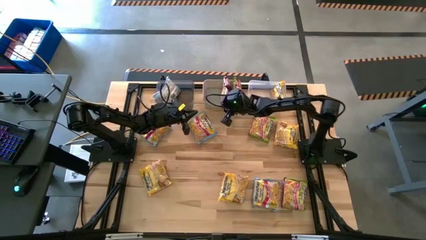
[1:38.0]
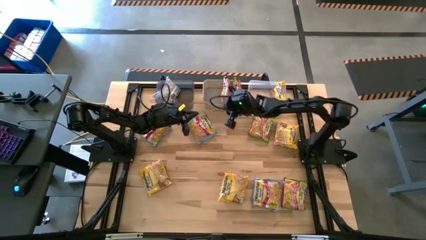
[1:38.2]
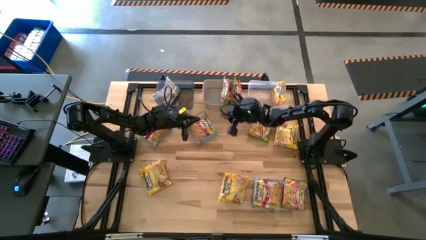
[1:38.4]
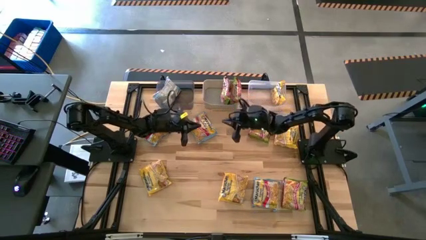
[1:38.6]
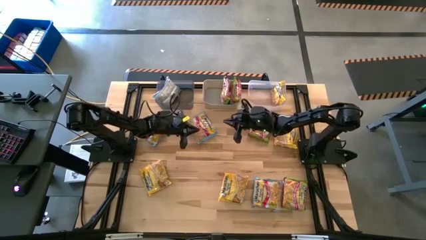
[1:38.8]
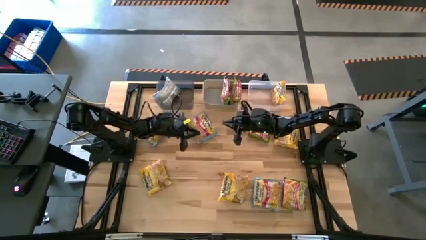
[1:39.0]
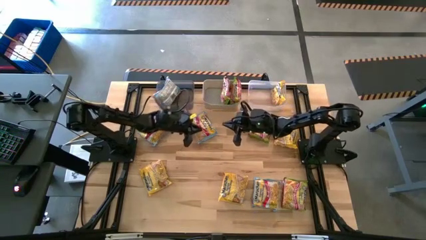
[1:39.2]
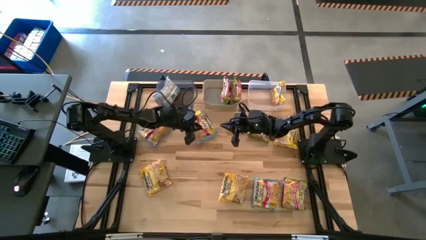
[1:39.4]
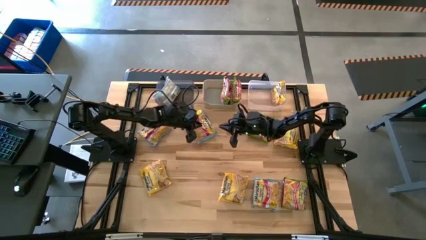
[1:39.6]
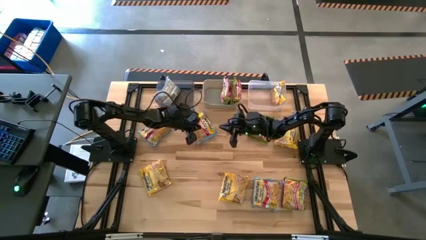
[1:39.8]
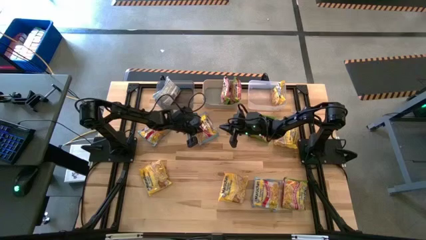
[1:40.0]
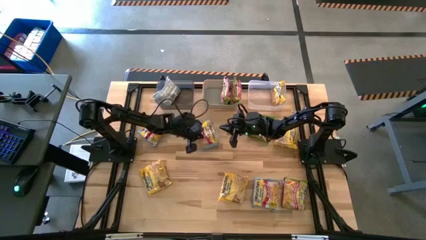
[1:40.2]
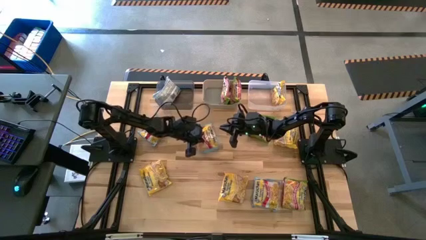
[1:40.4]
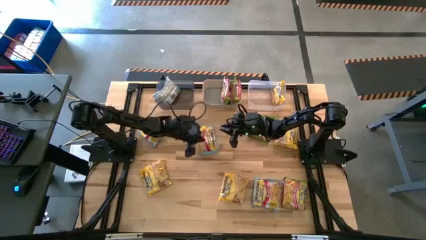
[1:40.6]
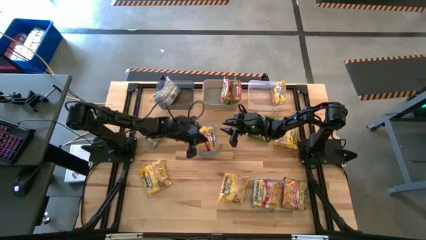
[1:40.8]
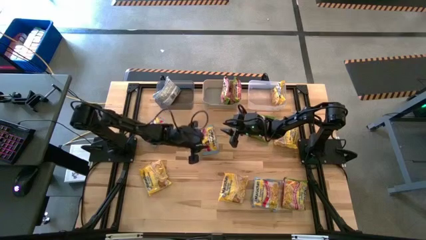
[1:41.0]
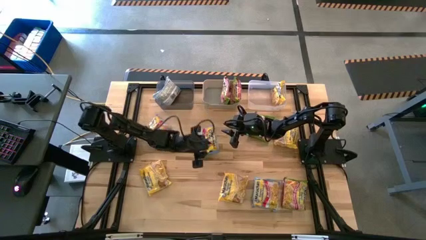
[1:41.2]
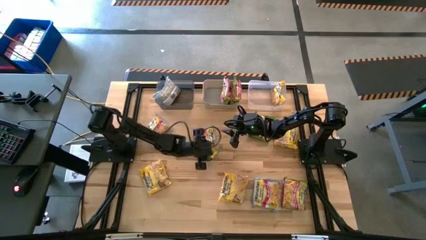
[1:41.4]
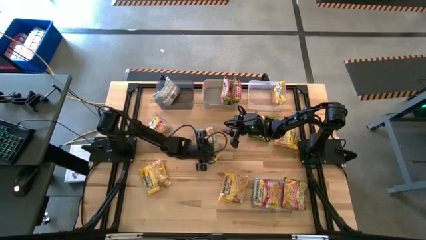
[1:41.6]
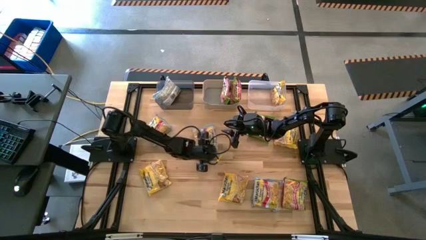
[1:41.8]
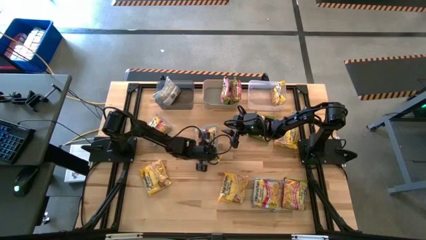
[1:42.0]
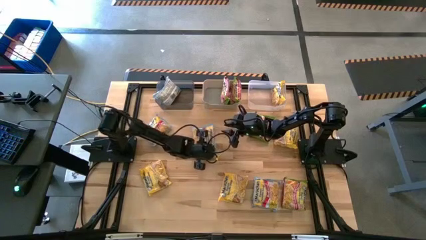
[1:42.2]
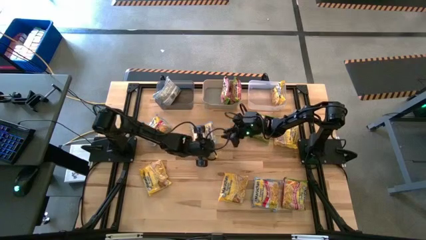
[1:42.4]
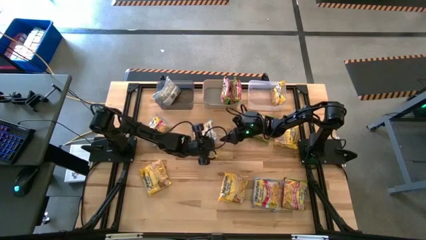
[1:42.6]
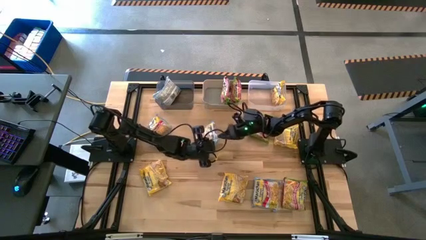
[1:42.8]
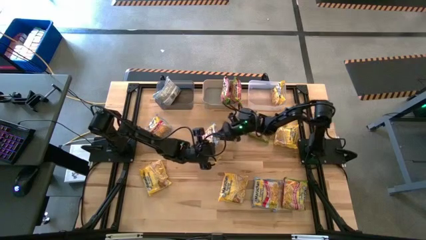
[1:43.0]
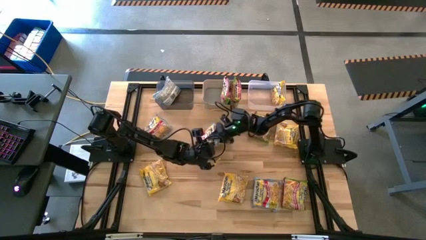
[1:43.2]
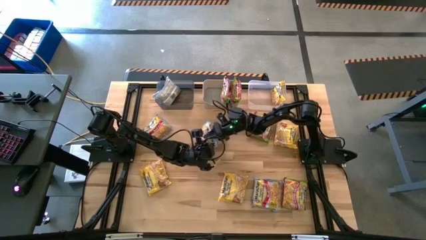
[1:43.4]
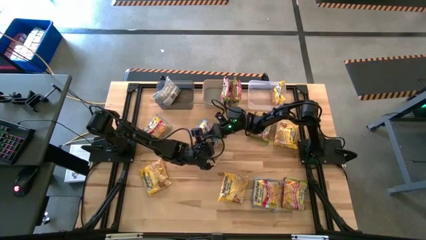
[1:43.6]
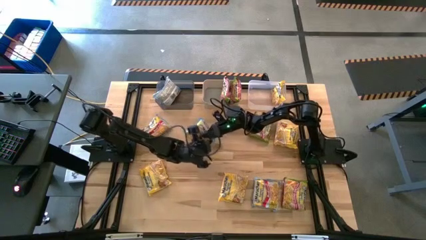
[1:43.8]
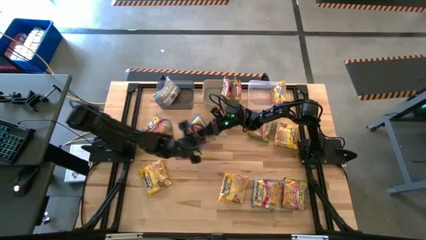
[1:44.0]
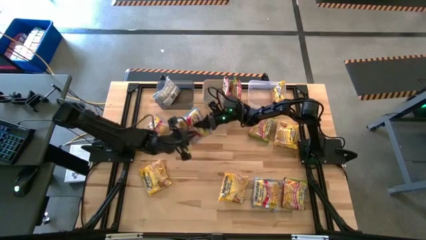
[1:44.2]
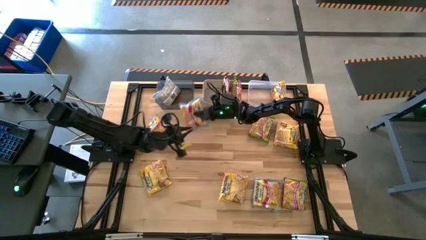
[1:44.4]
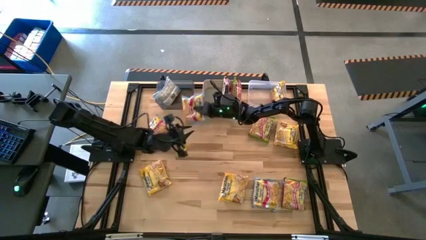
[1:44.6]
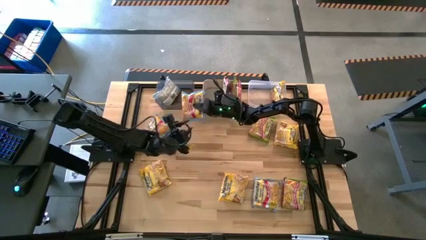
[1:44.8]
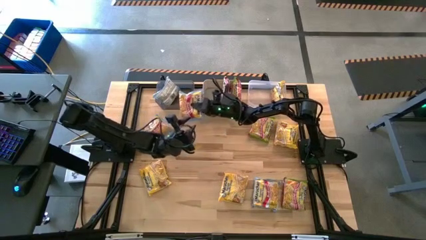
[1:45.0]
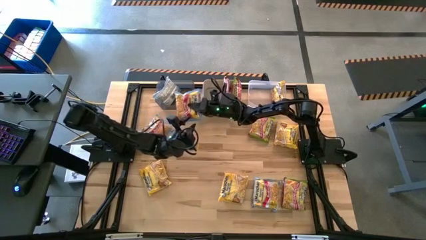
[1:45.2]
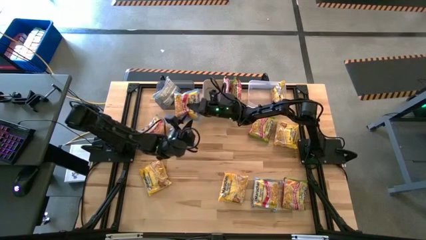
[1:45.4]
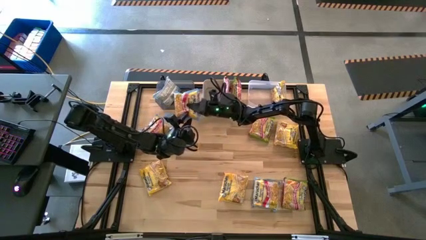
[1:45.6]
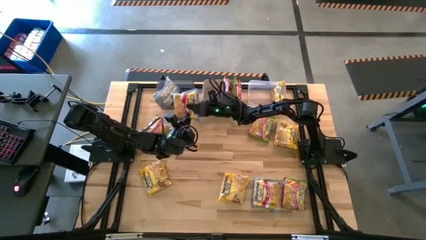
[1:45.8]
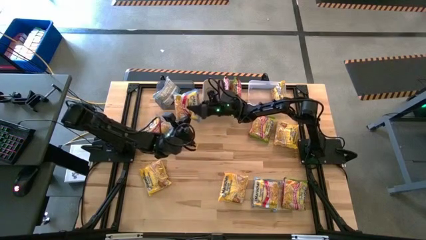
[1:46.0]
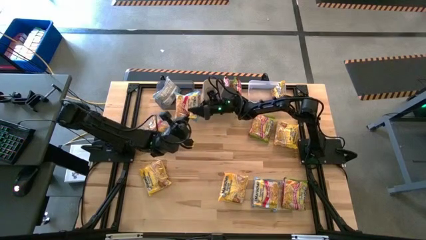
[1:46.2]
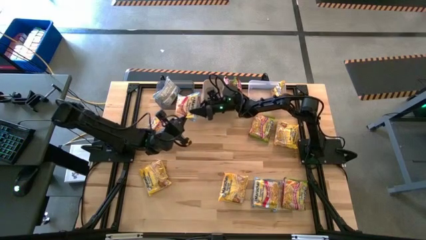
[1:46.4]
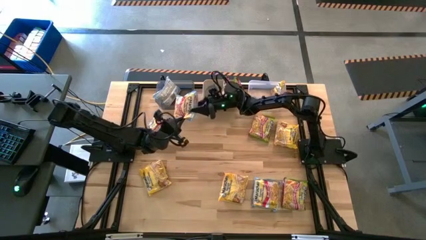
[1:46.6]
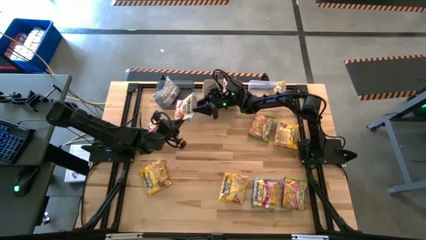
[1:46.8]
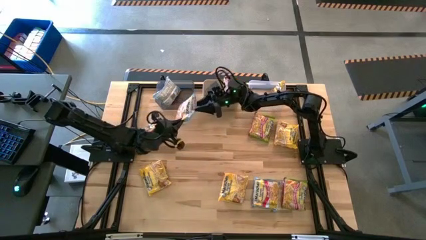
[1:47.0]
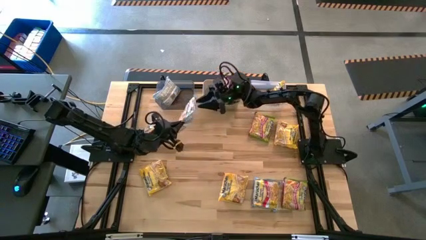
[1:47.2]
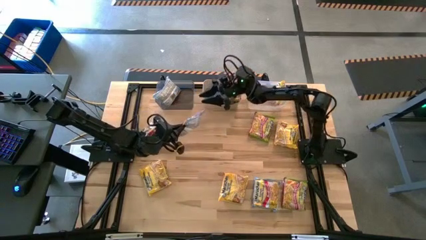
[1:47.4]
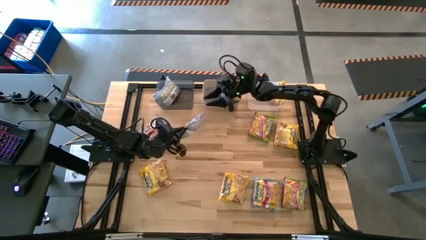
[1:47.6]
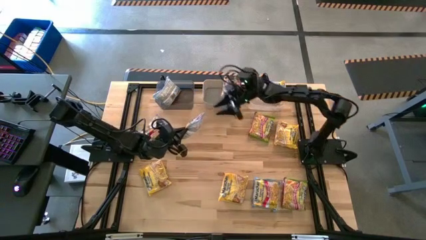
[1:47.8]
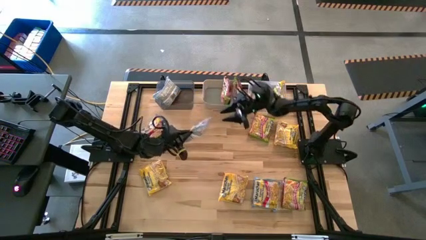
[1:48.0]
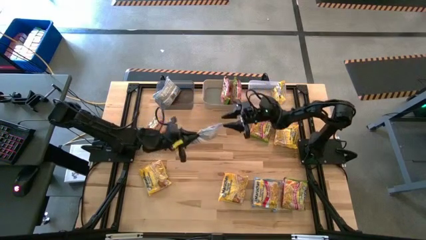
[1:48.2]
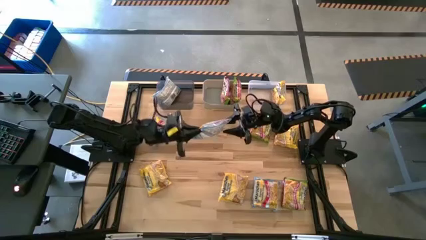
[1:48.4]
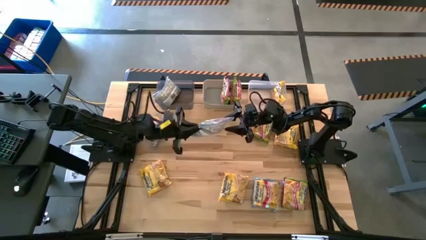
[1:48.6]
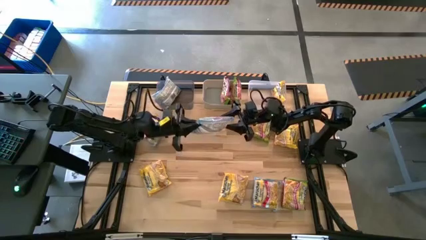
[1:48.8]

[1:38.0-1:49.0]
Task: Sort Maruchan noodles
Put the top right blue noodle pack into the black bin

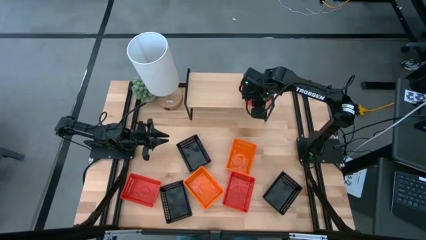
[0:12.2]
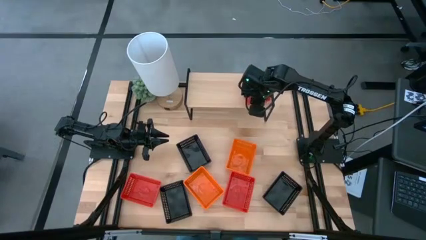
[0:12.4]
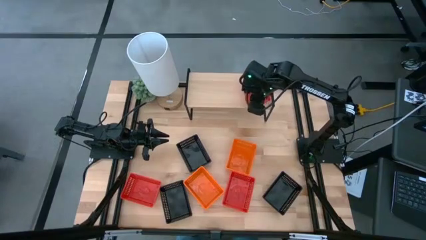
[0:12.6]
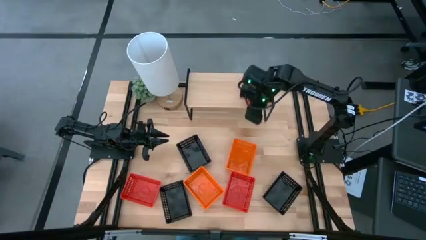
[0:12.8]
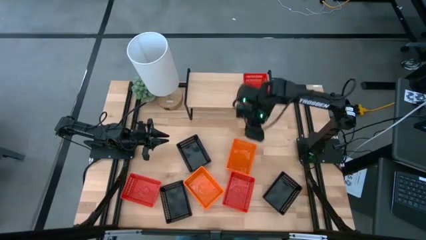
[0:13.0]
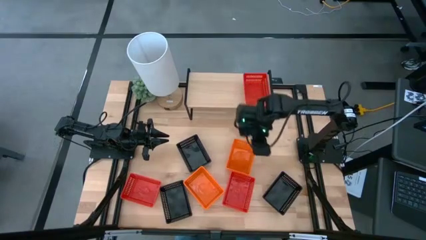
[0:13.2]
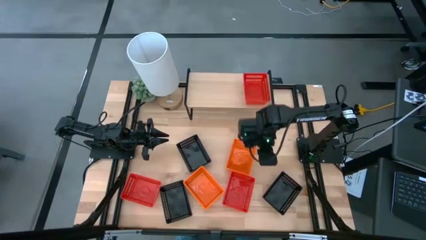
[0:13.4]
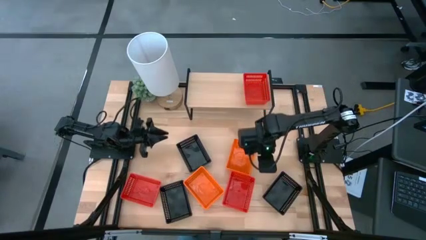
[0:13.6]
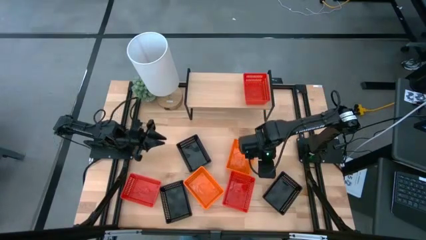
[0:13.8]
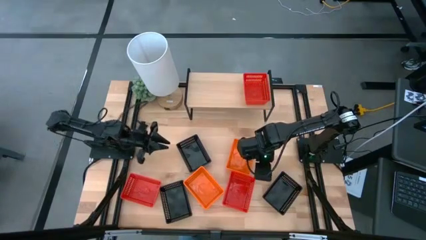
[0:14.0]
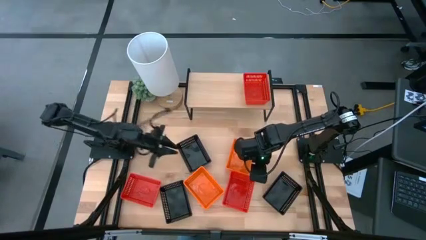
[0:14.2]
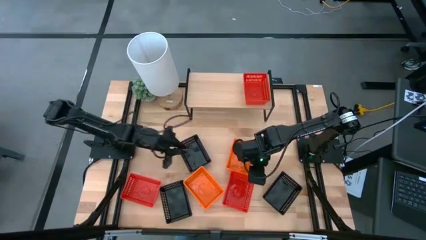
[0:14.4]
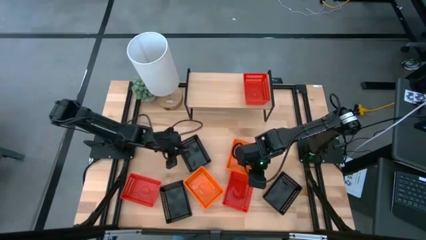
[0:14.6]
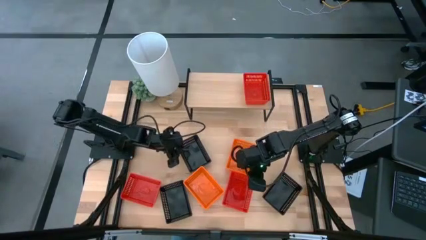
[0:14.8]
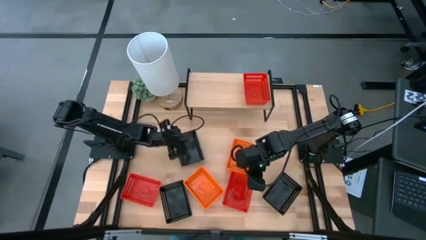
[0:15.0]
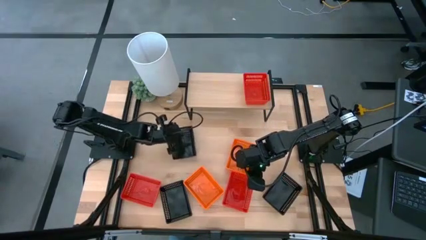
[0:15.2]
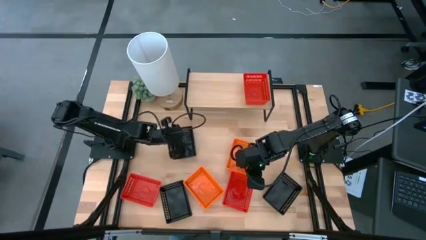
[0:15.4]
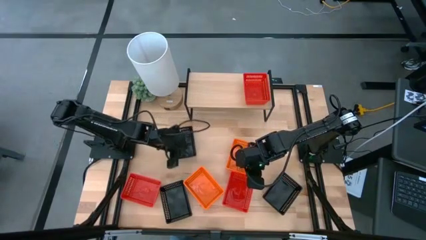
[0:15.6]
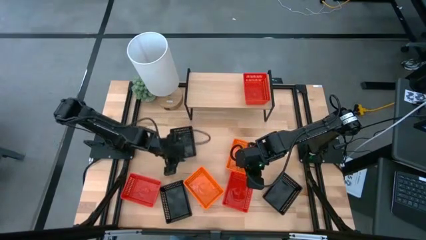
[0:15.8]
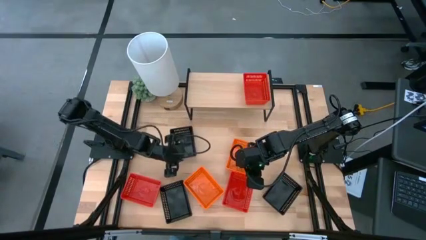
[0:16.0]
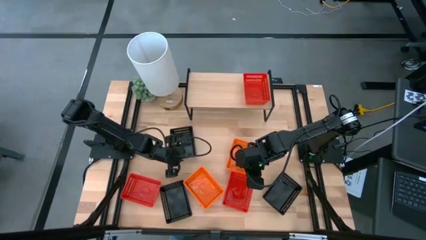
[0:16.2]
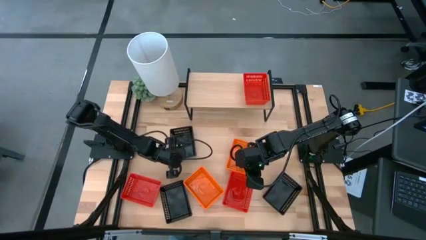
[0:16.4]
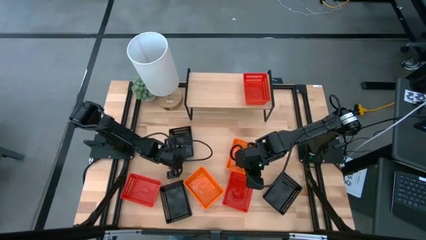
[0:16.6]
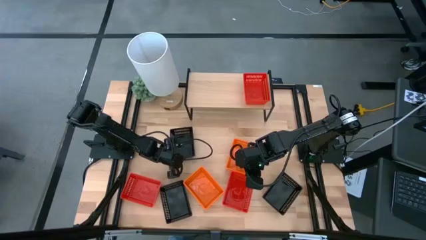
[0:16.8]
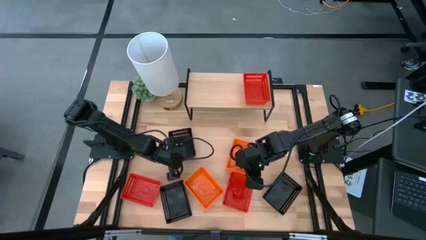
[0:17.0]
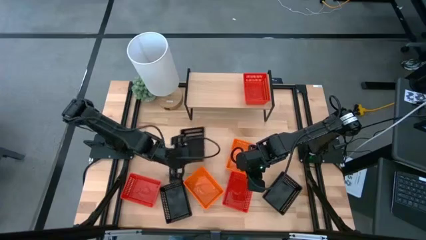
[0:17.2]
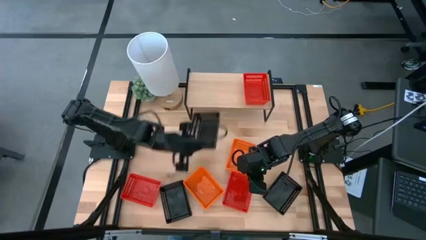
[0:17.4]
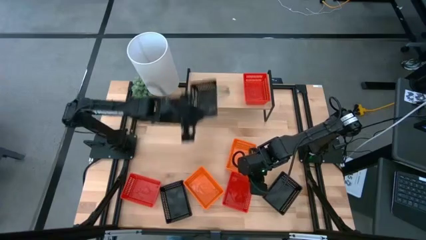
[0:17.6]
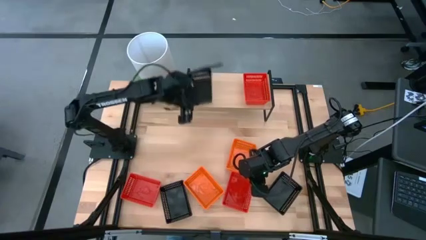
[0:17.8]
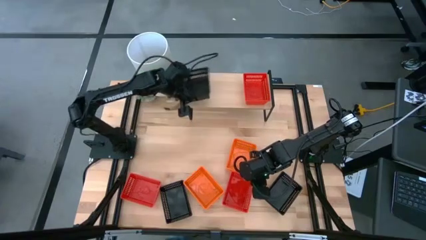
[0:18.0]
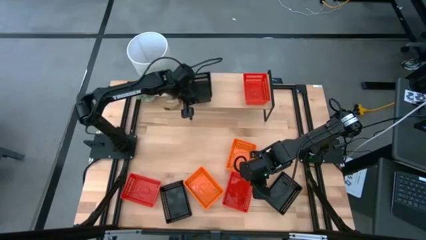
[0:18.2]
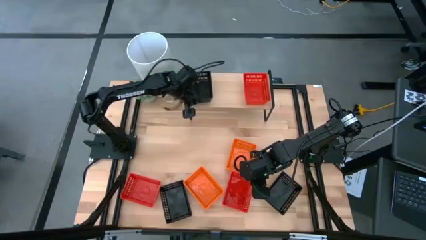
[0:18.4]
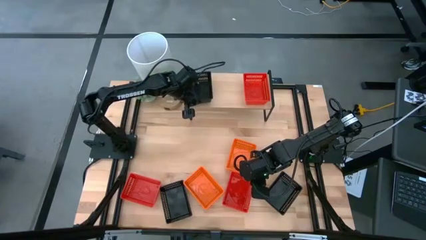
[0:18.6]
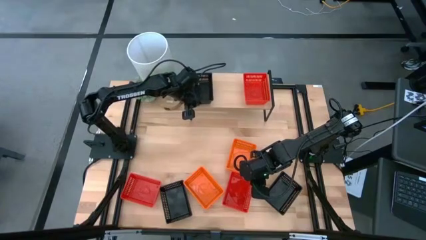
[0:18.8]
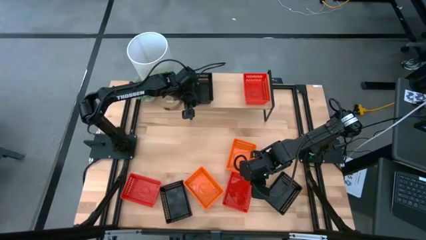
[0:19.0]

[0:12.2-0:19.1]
Task: Stack baskets on shelf by color
Put the top black bin on the shelf
